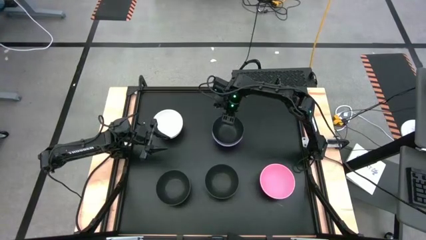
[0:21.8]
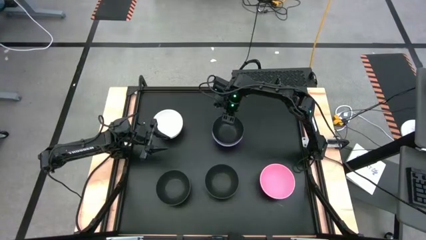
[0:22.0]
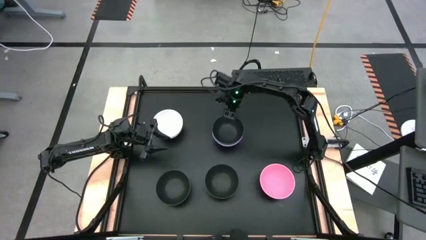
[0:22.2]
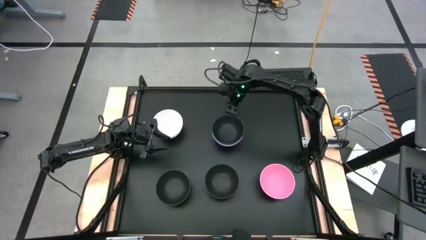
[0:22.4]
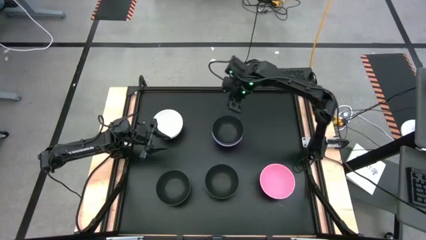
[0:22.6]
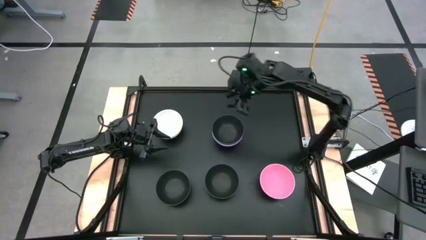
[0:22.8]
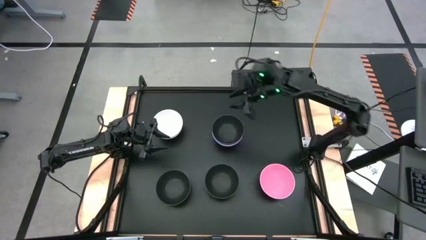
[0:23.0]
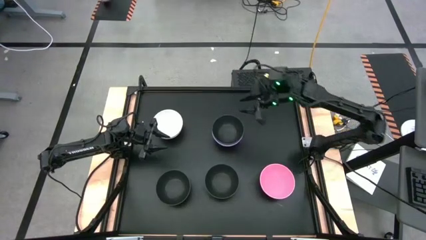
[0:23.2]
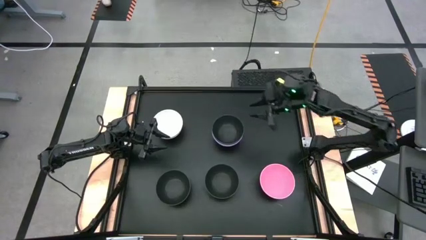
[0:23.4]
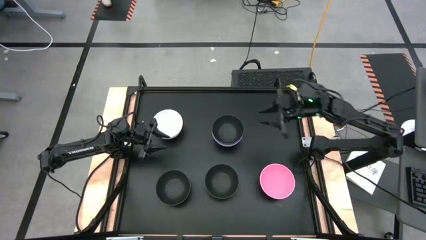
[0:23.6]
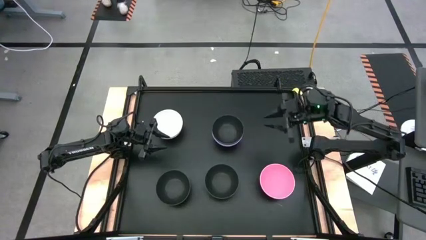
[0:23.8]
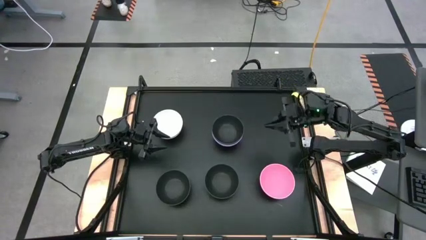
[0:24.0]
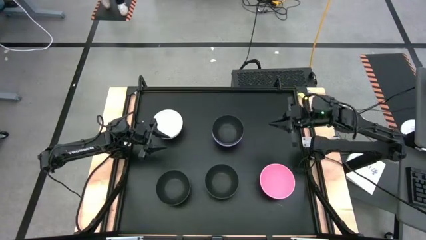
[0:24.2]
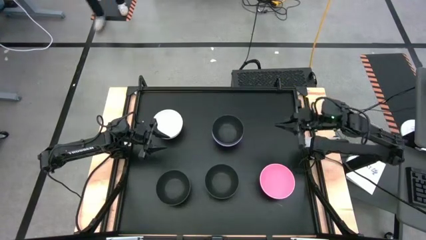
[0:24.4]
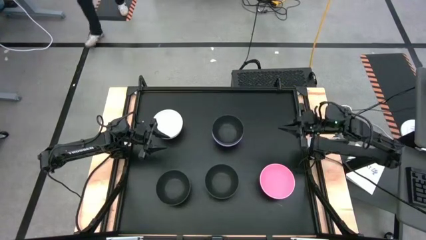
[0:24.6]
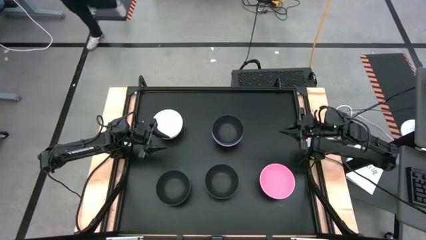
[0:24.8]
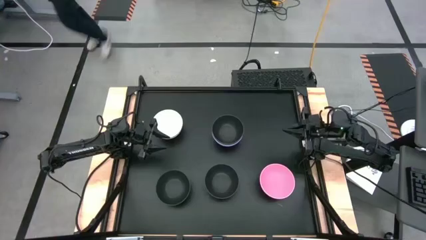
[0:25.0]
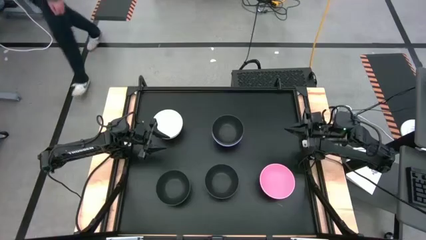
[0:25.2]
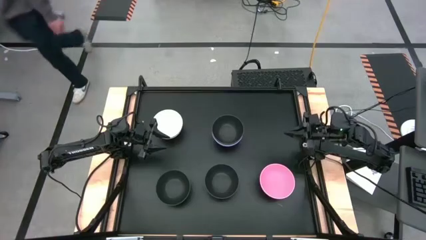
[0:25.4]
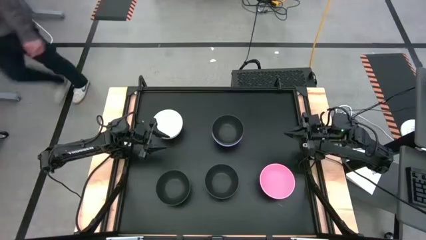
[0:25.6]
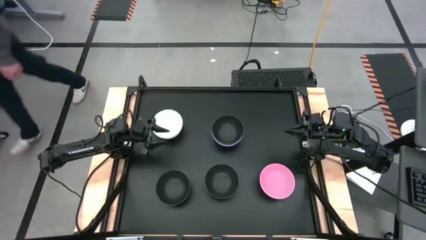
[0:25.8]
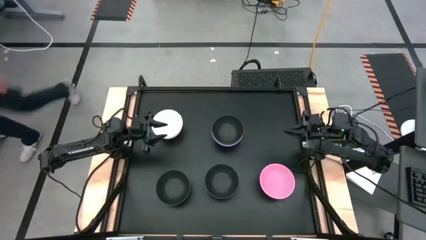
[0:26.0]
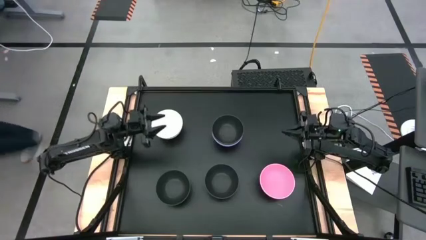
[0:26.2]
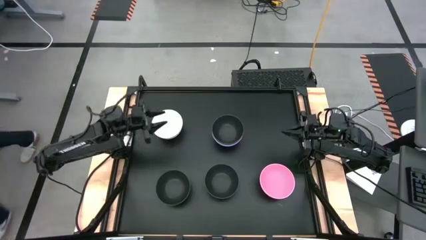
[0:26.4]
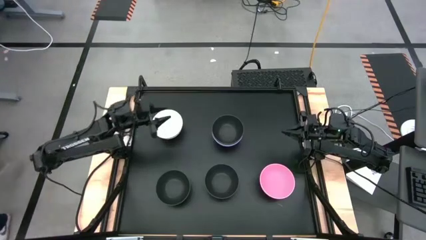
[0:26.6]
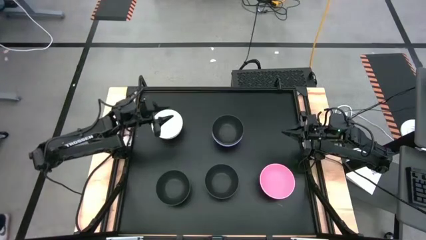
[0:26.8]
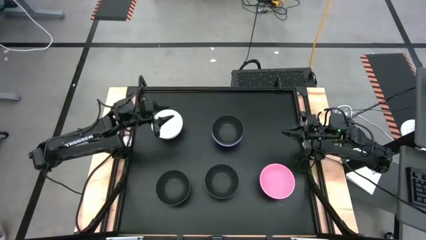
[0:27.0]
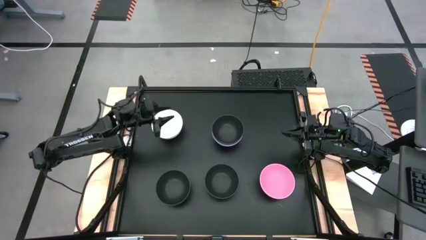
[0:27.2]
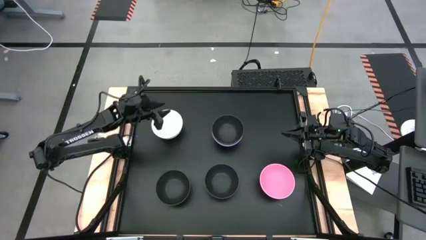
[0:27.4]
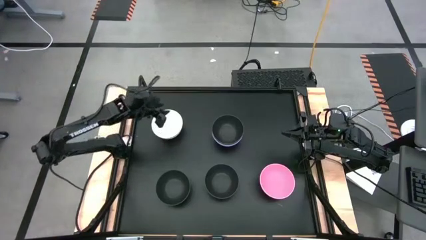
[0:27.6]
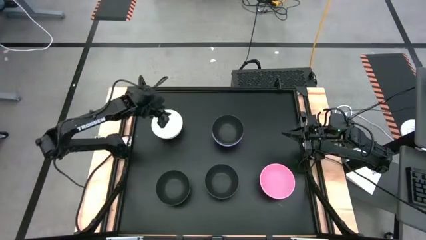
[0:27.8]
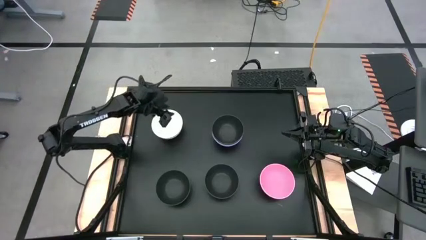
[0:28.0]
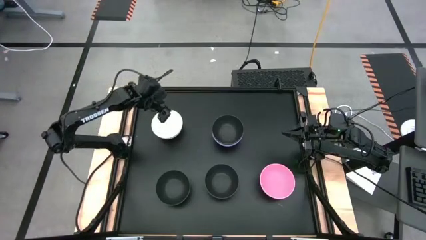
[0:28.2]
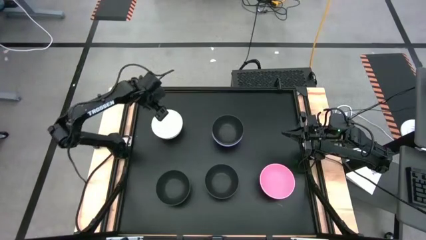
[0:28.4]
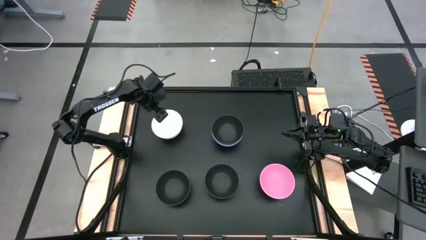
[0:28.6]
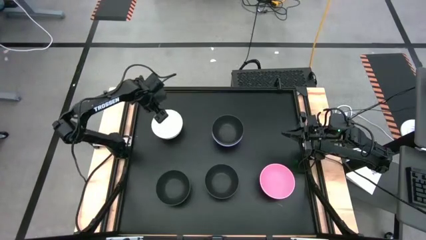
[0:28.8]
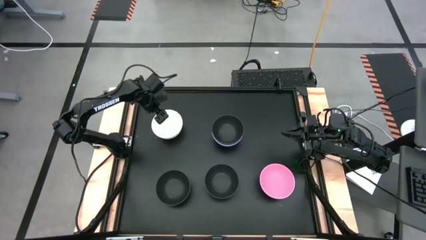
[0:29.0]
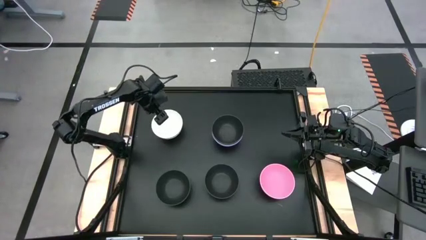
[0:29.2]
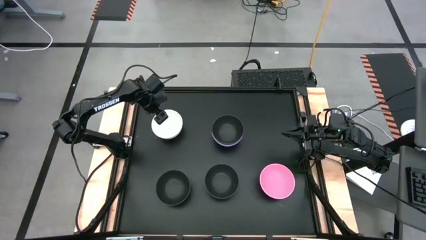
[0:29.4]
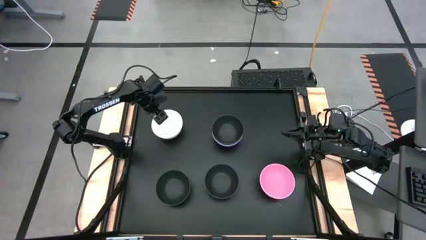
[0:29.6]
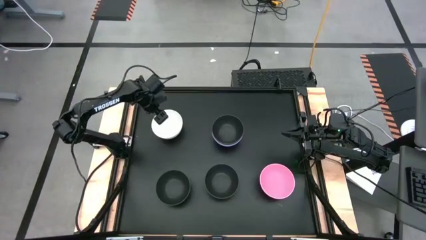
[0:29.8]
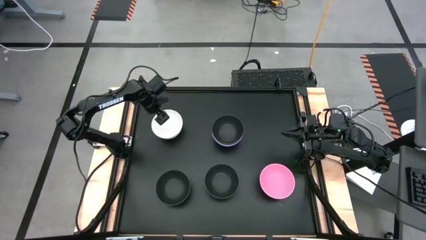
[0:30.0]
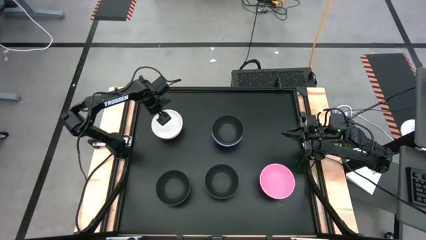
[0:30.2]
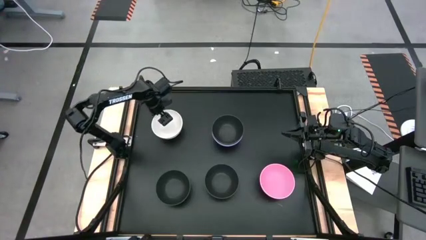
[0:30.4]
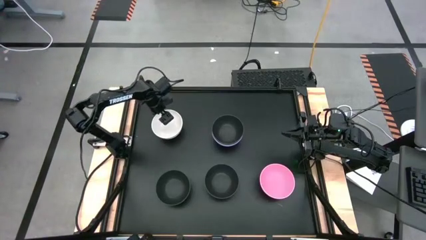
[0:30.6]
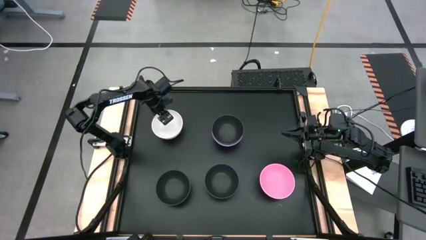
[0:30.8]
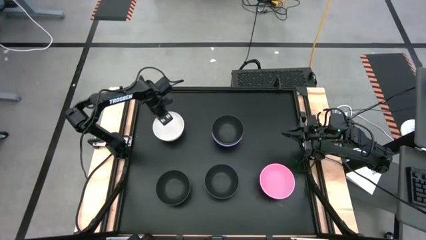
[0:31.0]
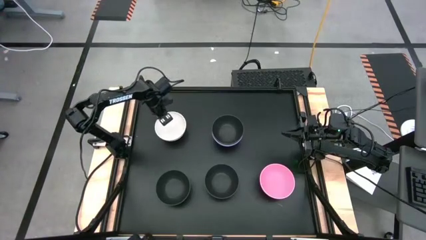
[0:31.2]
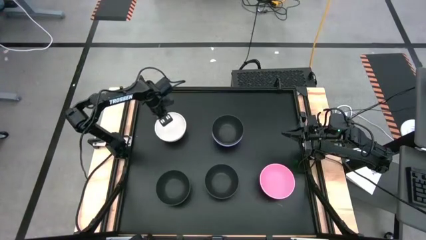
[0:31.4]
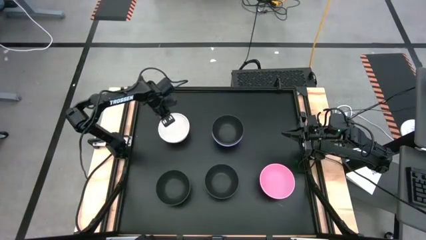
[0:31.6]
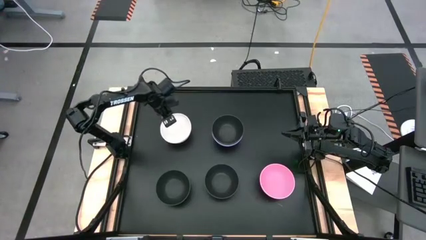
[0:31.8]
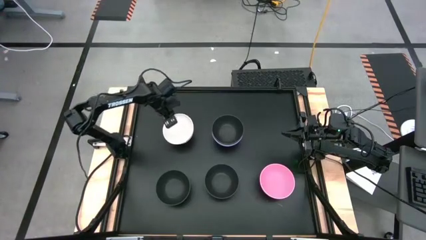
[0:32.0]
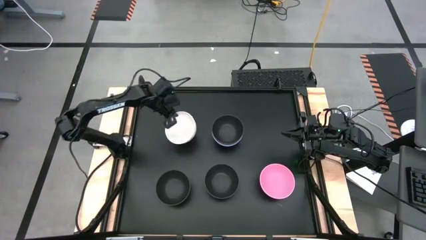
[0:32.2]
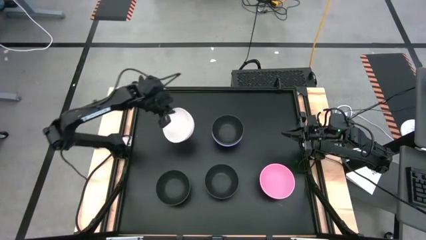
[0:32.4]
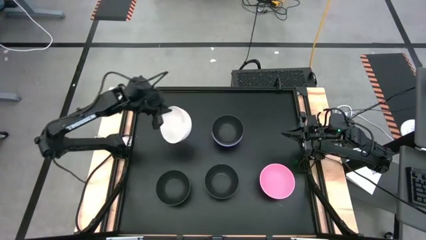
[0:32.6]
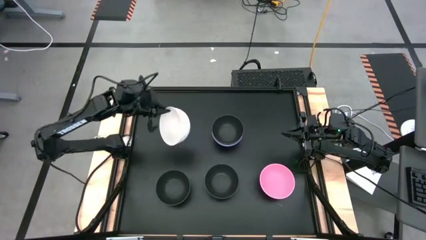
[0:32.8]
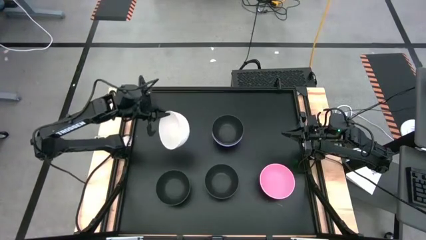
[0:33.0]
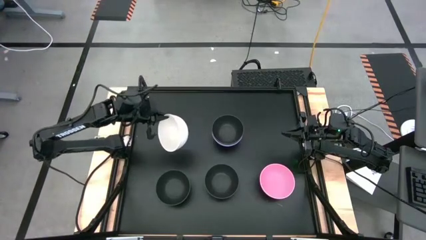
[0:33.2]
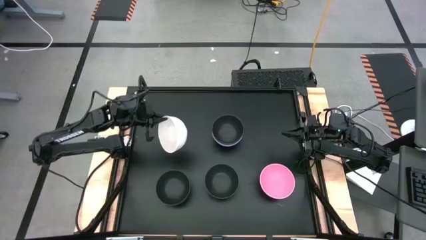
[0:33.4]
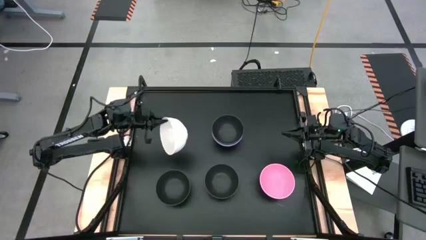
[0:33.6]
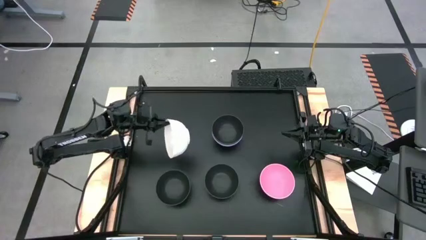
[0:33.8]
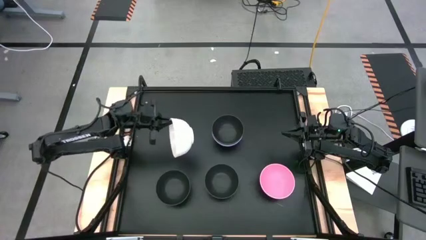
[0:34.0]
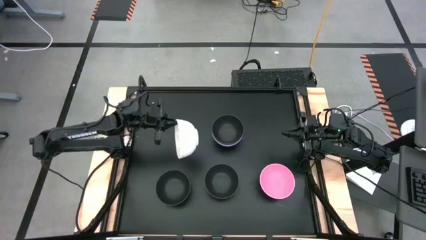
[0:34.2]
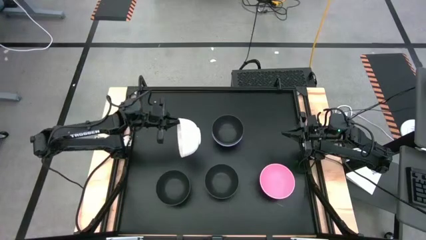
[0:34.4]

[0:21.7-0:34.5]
Task: Nest bowls inside each other
Stack the white bowl on top of the black bowl

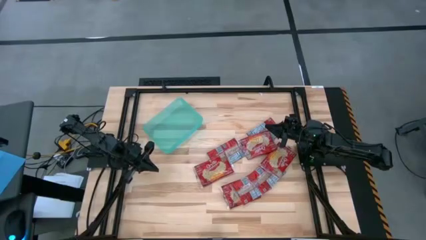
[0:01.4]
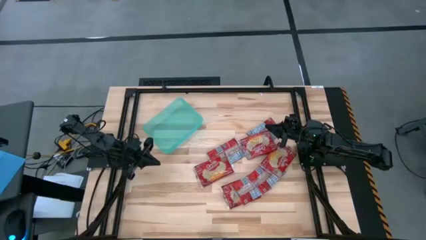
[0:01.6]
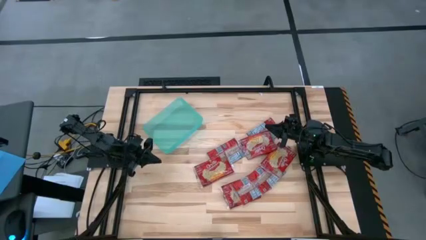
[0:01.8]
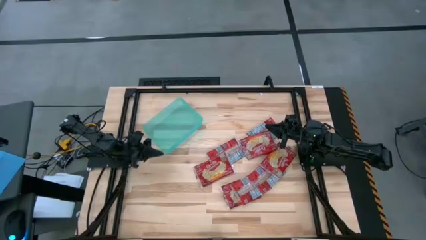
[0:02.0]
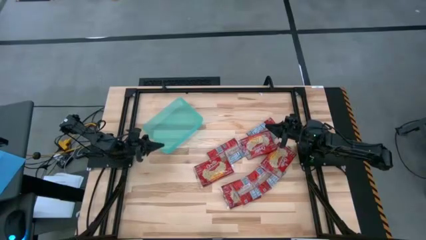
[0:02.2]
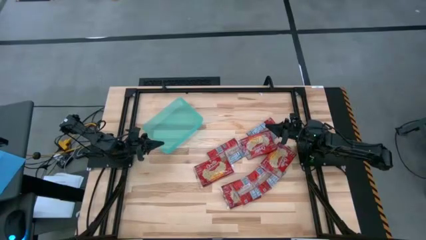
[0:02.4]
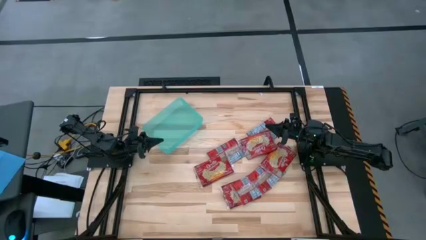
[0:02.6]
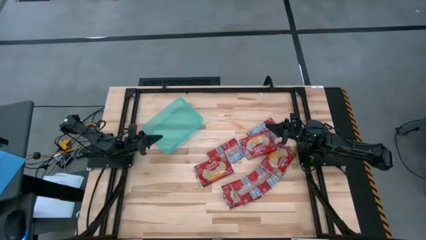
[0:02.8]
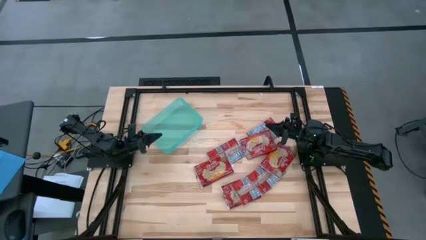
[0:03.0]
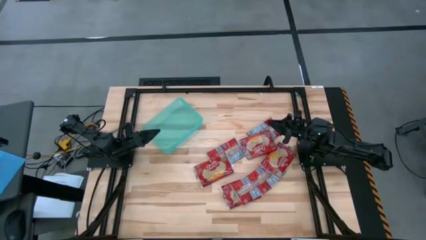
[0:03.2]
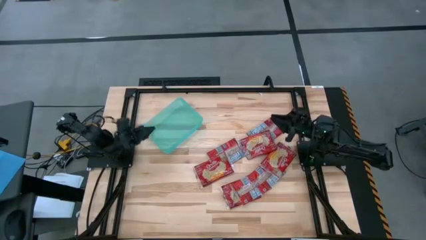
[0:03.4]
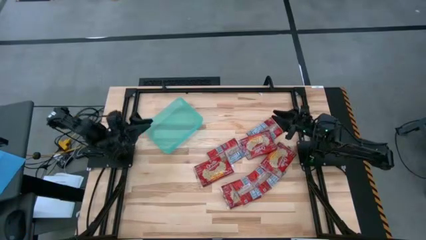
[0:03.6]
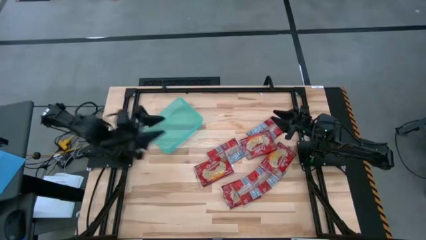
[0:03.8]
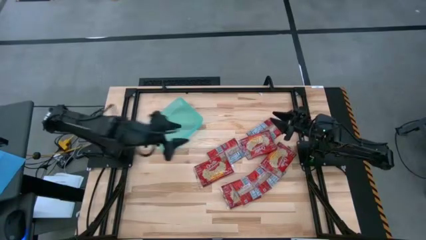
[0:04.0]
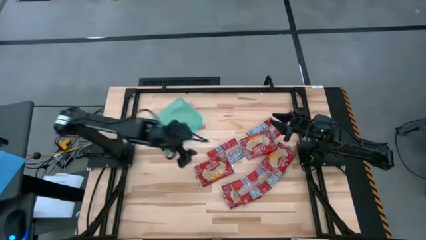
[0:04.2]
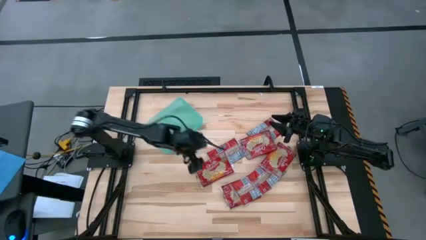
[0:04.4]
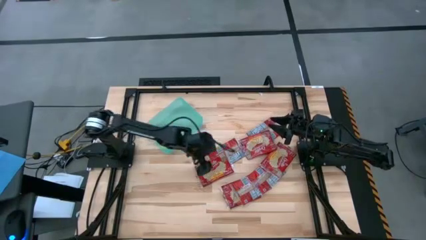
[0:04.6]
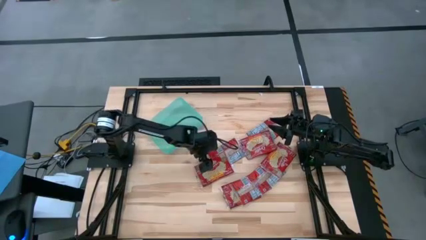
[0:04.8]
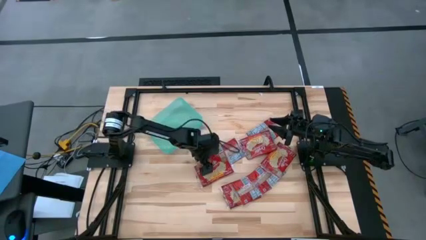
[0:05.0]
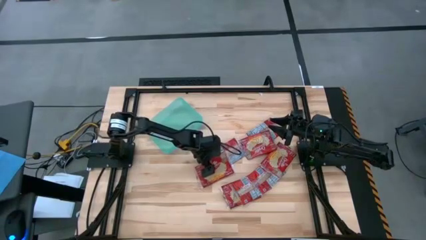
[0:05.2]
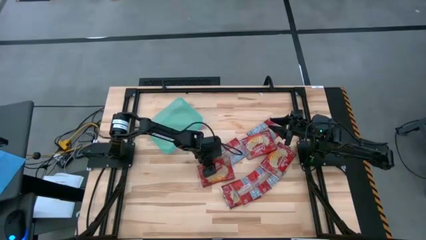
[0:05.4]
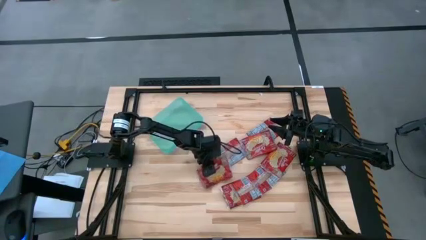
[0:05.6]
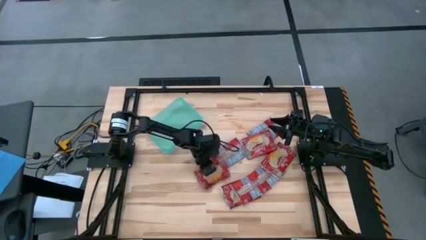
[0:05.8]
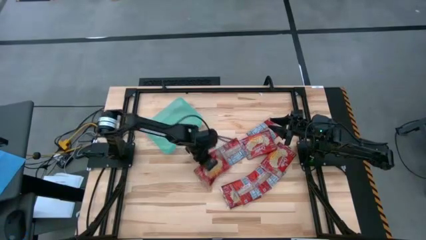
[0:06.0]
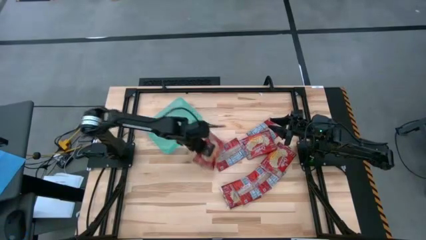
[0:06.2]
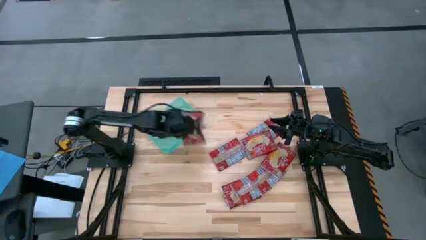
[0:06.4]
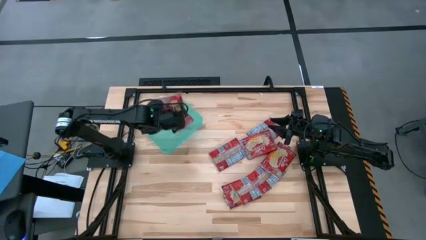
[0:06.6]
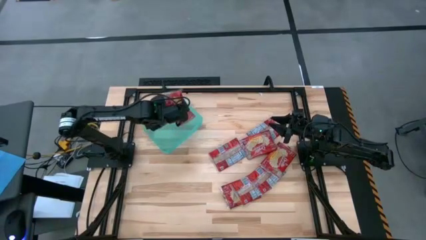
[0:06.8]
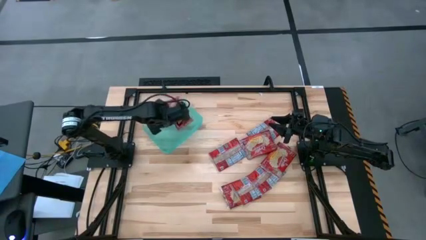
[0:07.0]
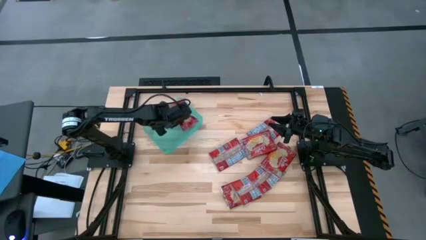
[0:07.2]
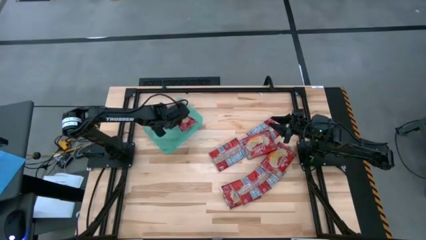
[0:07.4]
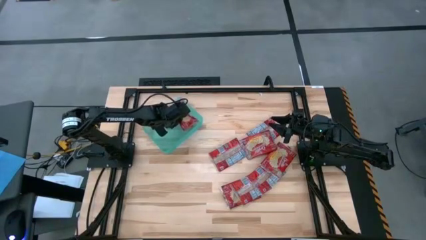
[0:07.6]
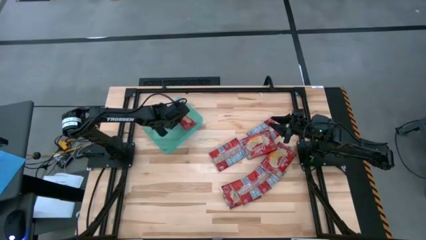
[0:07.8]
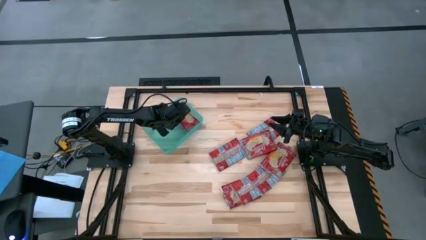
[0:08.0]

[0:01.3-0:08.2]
Task: Sort popcorn bags into baskets
Put the red popcorn bag into the blue bin
